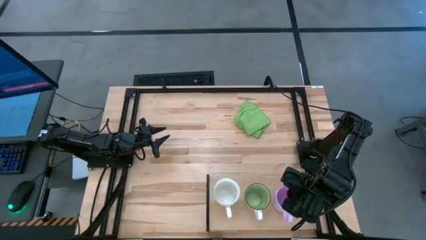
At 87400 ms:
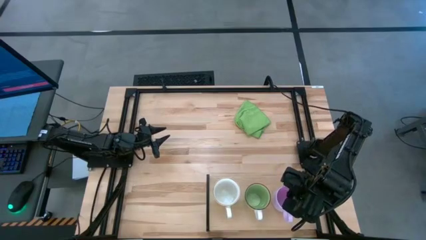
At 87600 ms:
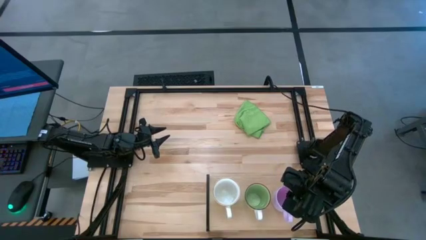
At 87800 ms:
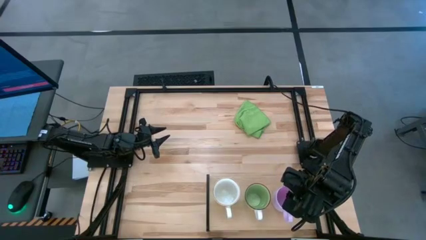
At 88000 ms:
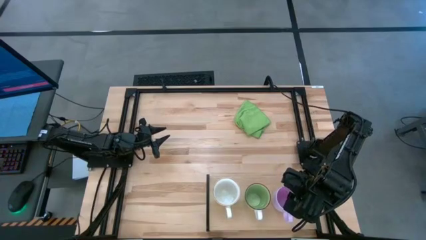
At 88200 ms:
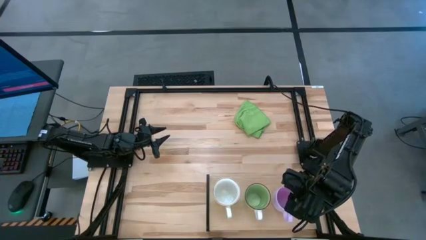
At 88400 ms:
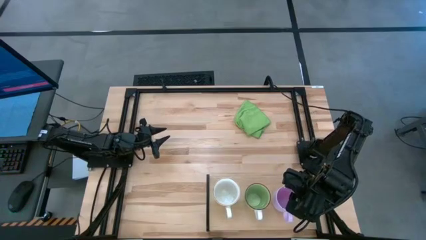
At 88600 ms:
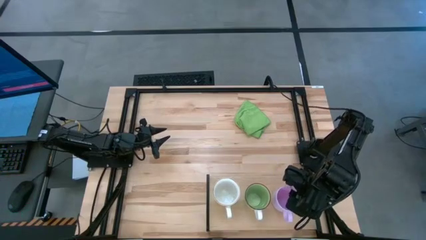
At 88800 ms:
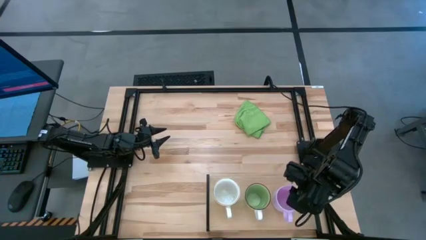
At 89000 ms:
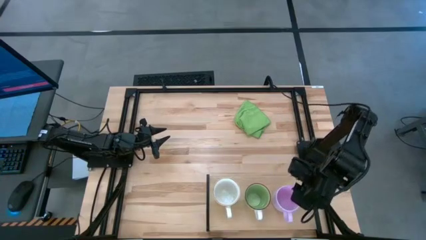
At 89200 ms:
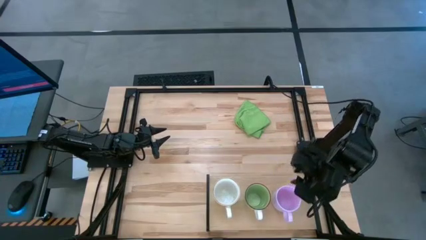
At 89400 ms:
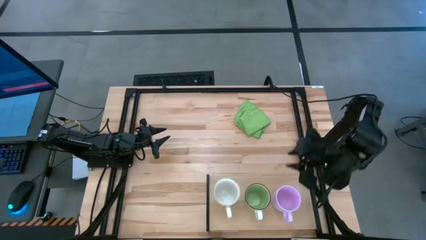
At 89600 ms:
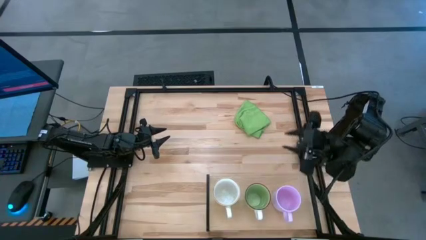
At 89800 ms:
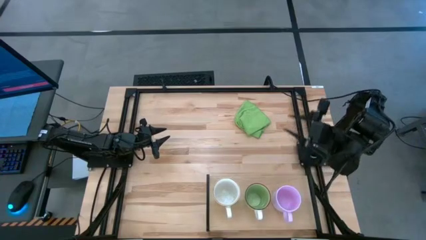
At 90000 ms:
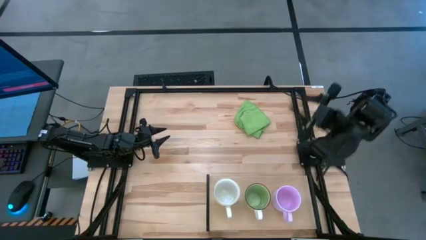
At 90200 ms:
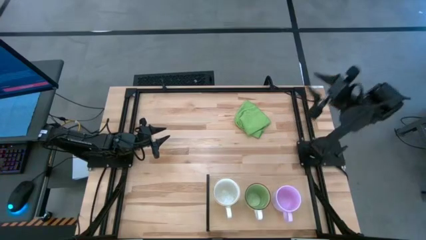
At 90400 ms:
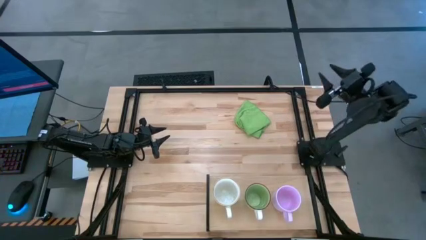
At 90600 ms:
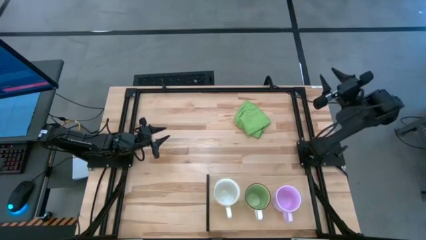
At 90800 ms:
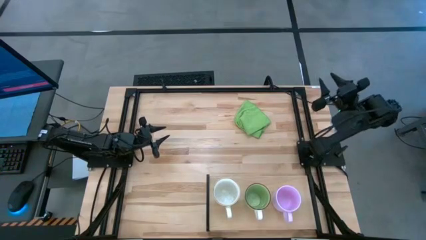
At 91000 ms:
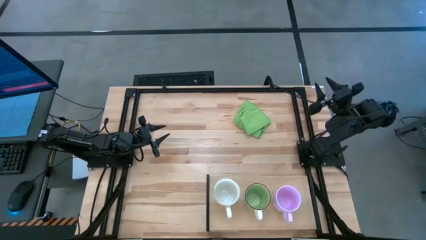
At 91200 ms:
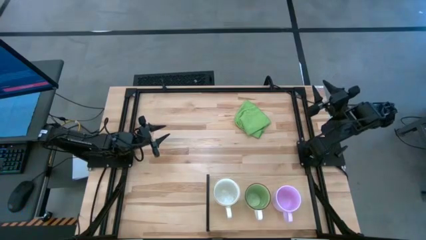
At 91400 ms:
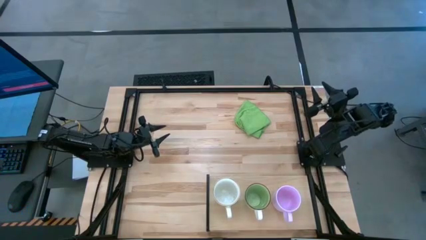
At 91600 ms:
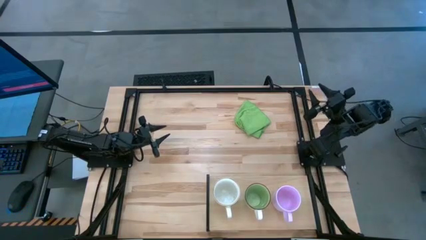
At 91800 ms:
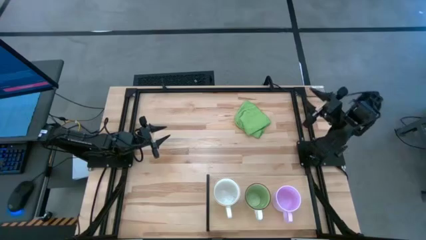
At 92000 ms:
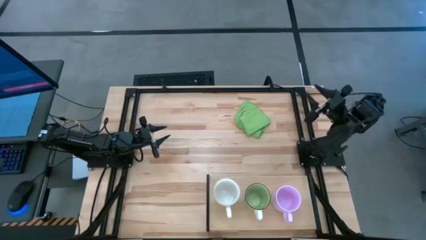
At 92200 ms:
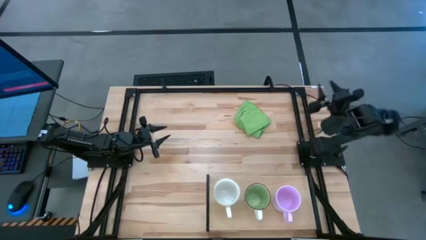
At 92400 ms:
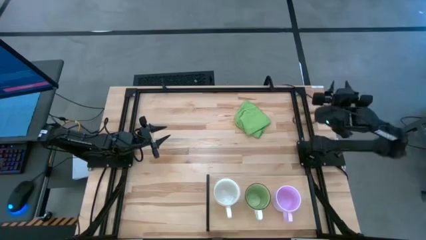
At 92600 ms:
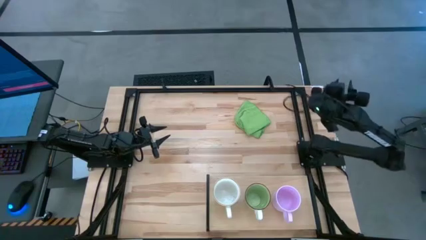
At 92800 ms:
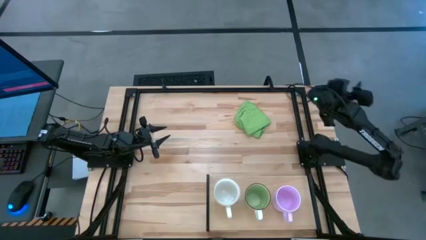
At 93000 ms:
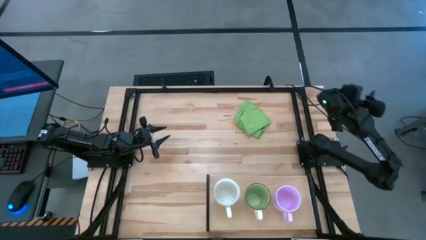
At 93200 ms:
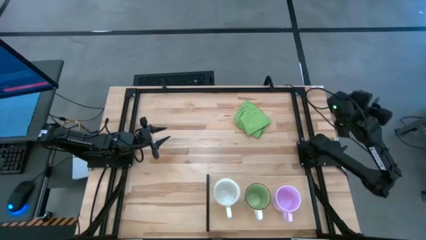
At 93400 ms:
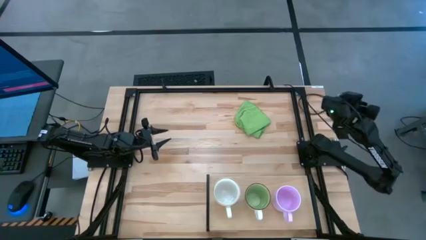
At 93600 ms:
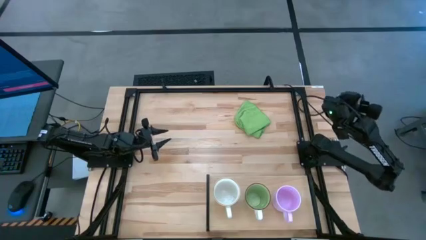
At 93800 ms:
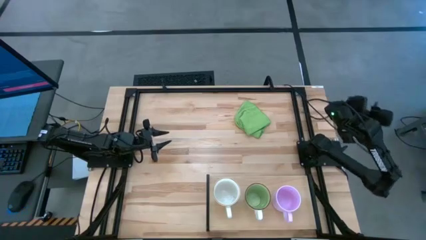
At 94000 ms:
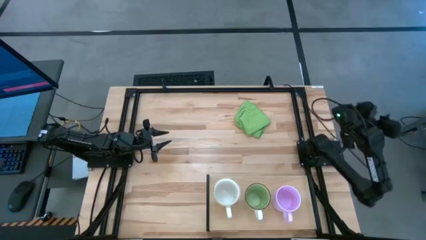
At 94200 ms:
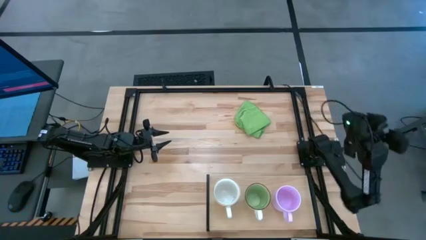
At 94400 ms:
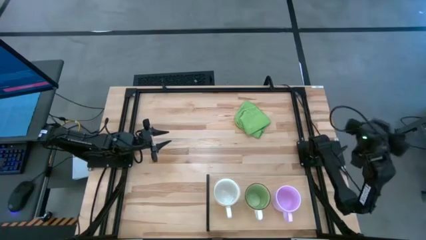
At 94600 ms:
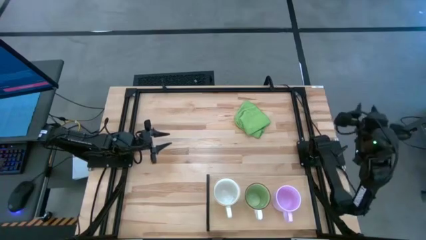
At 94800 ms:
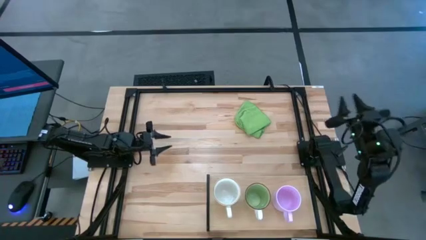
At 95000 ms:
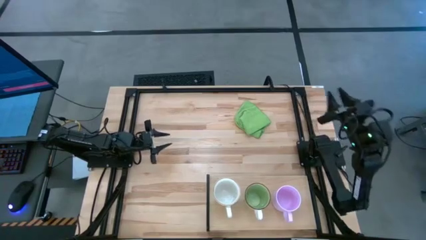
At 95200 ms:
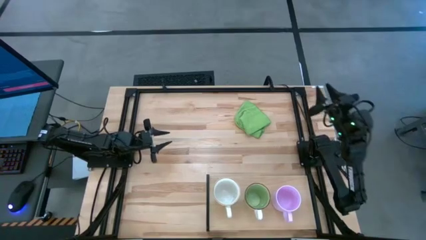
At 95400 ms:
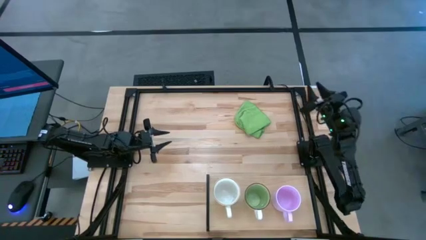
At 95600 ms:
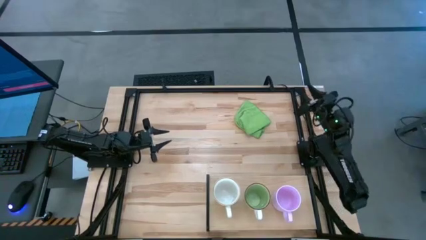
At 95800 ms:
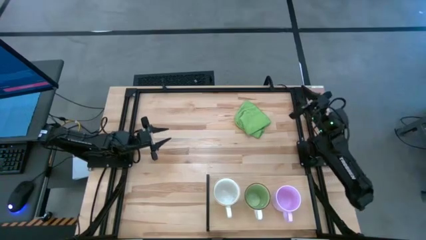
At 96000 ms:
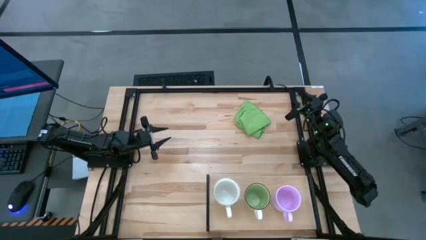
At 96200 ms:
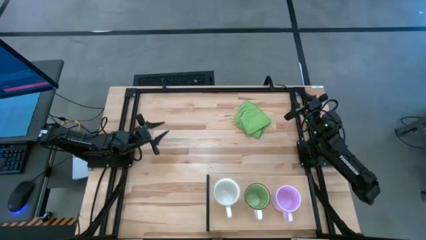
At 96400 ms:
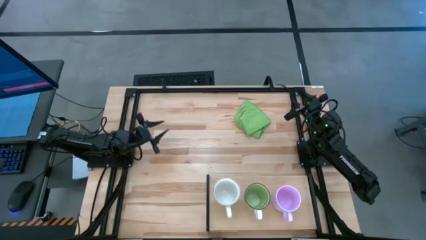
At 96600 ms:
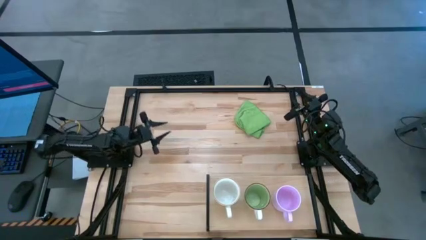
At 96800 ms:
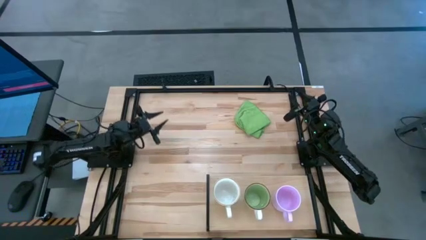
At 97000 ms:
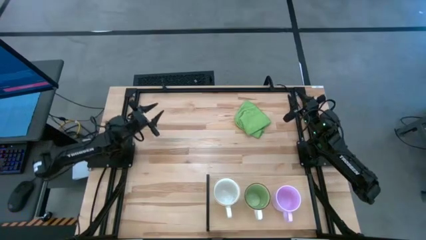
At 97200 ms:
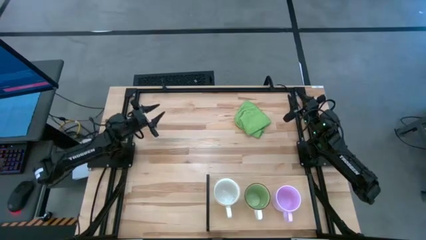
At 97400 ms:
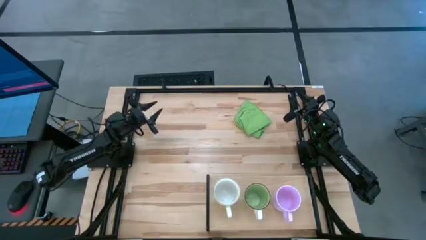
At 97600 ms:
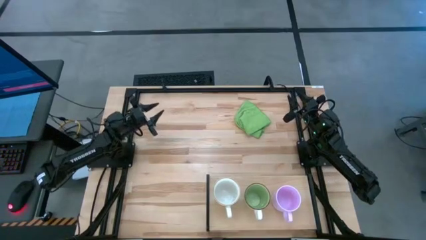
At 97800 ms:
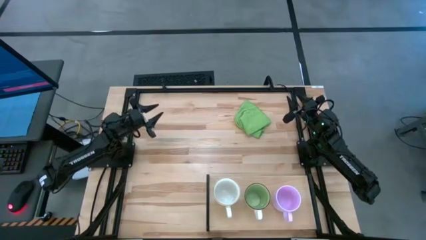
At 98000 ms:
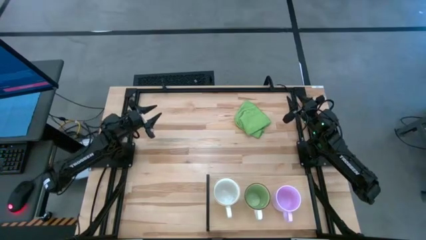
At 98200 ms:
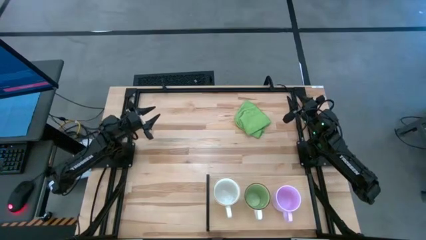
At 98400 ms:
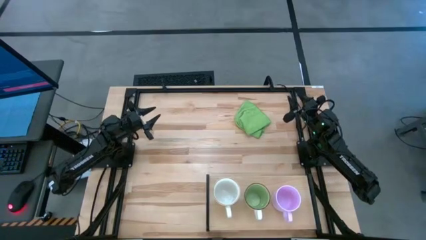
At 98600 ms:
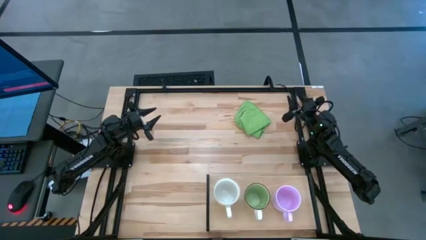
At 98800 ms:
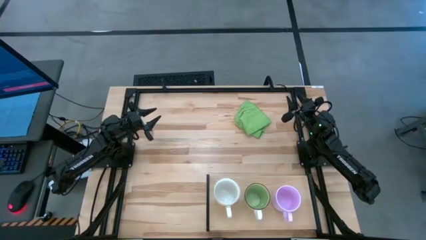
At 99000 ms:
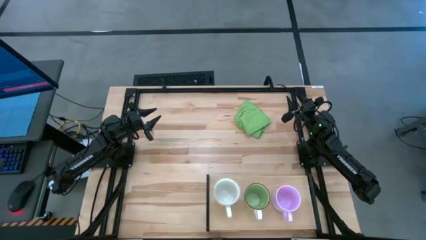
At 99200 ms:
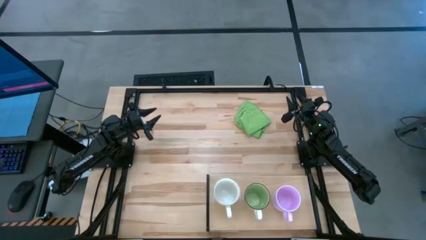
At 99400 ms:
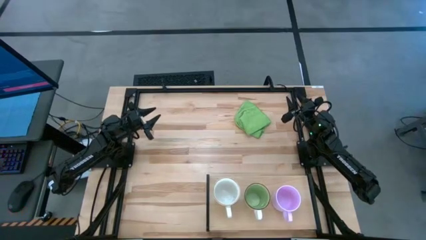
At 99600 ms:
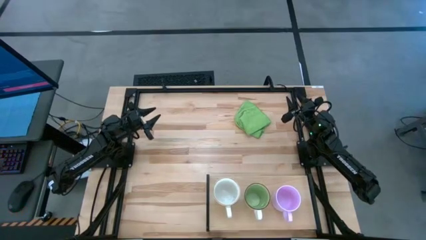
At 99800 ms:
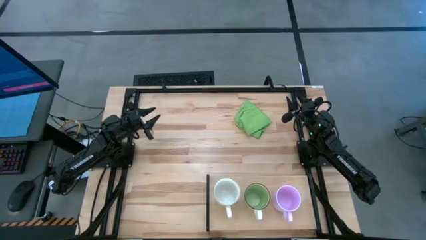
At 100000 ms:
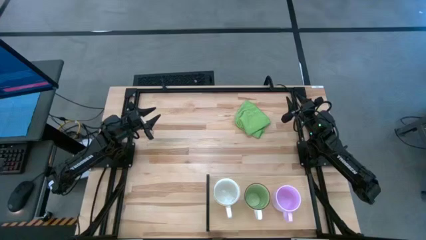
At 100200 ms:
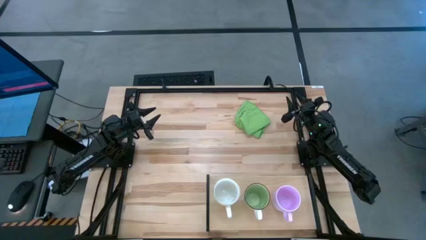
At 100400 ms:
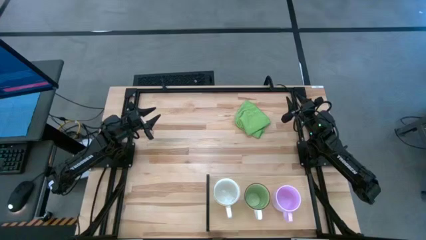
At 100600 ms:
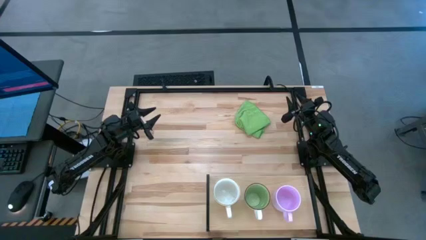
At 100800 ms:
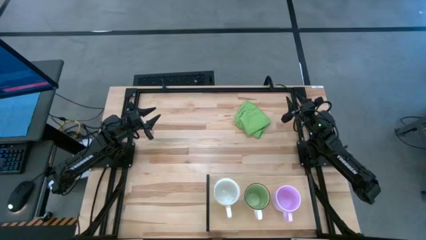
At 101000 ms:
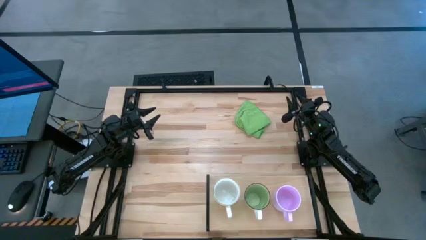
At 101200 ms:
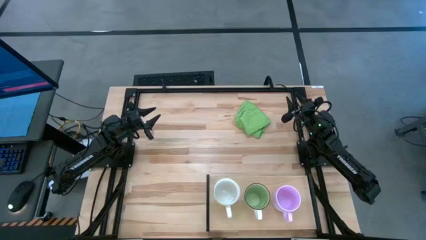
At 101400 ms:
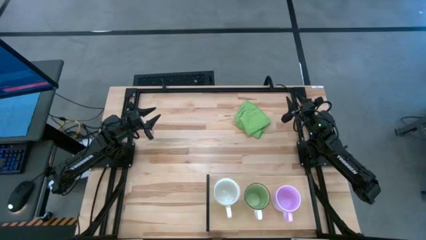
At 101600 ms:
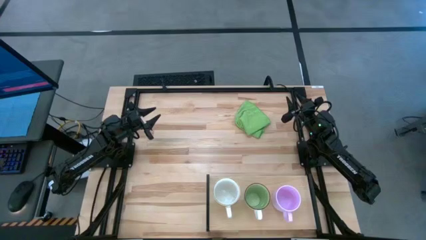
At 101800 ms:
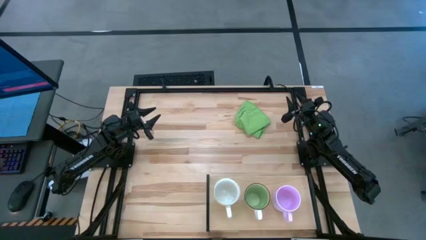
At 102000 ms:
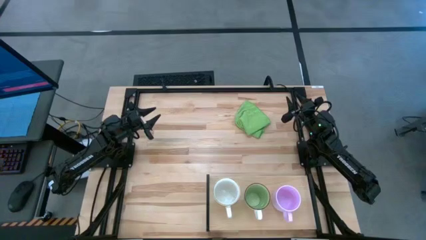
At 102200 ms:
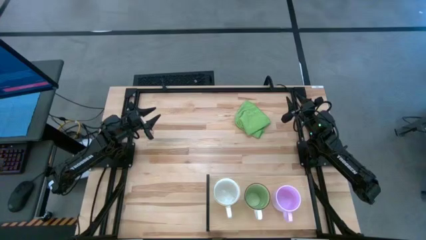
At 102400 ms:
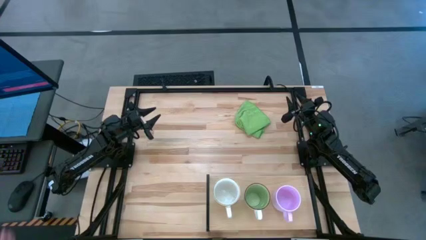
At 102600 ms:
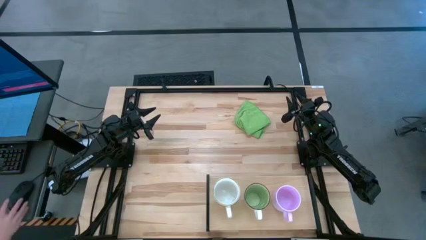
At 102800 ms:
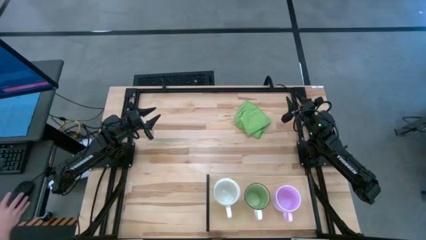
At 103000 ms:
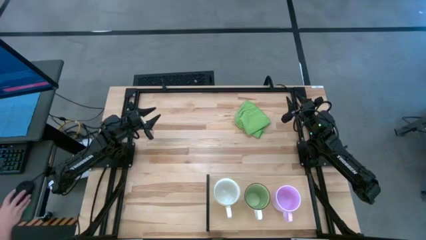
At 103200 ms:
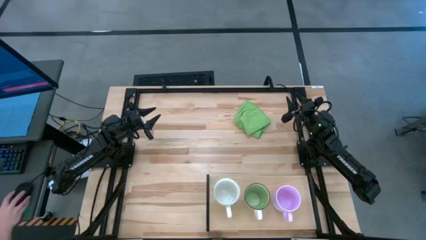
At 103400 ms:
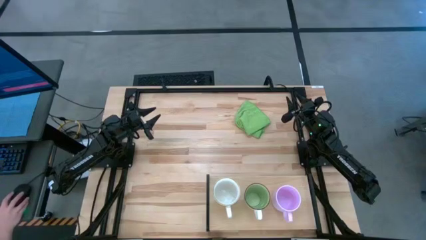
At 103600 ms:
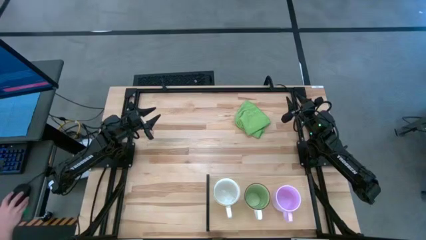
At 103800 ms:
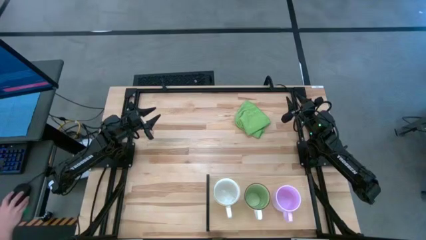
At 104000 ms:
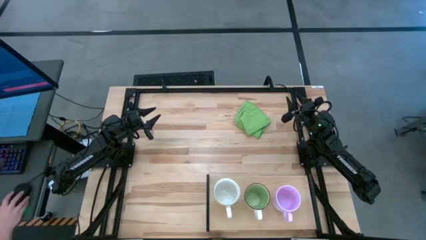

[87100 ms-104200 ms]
Task: Stack small to large cups/mugs on shelf
Return to Home Position
